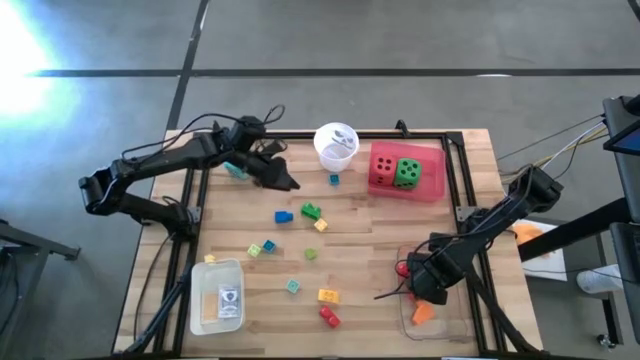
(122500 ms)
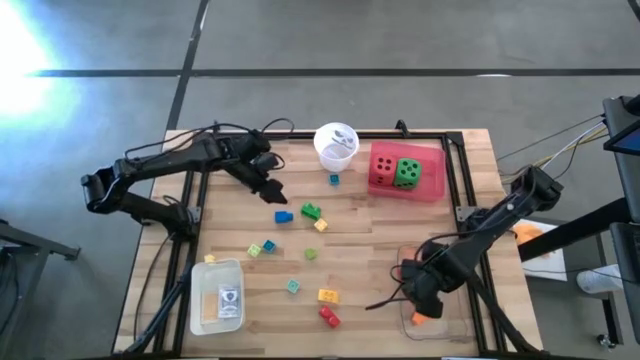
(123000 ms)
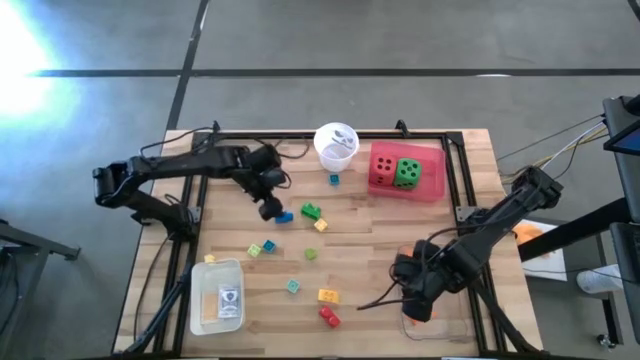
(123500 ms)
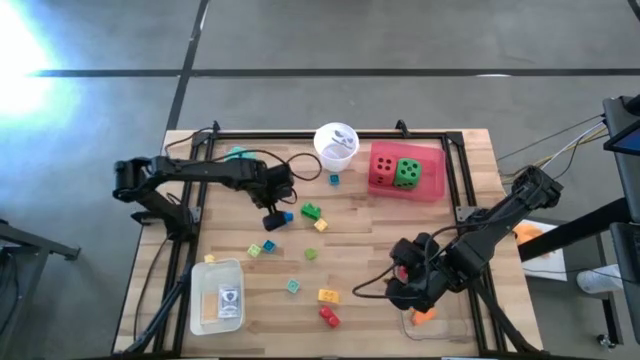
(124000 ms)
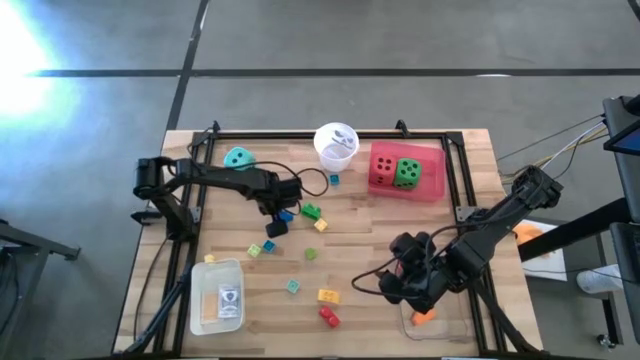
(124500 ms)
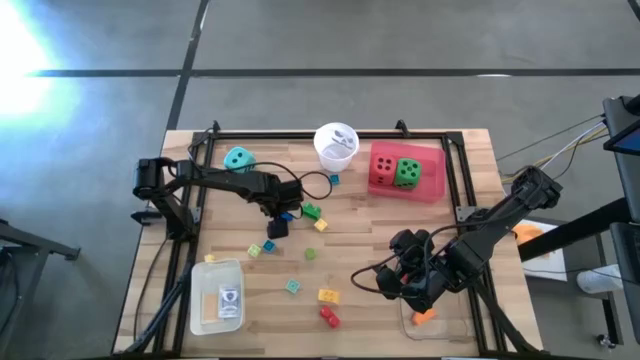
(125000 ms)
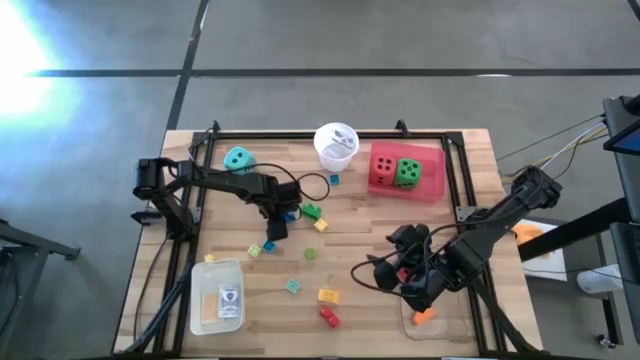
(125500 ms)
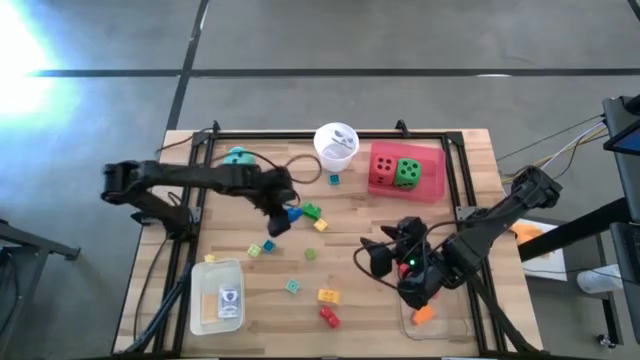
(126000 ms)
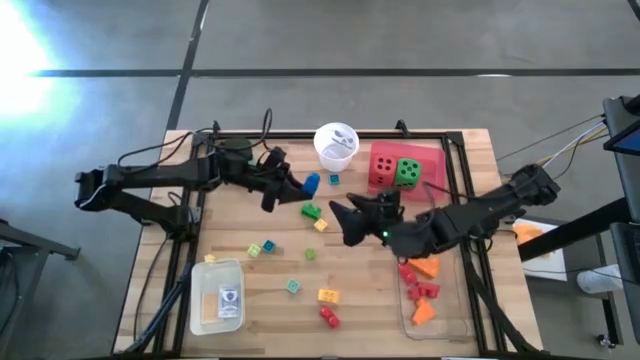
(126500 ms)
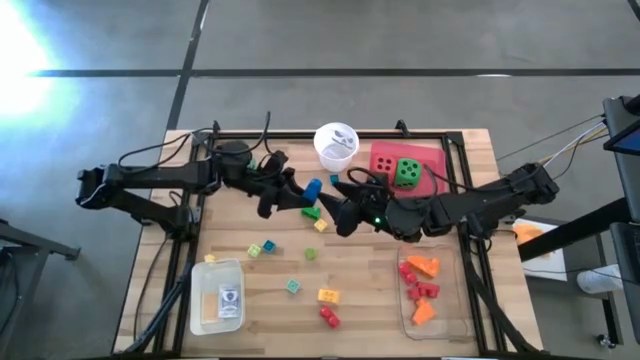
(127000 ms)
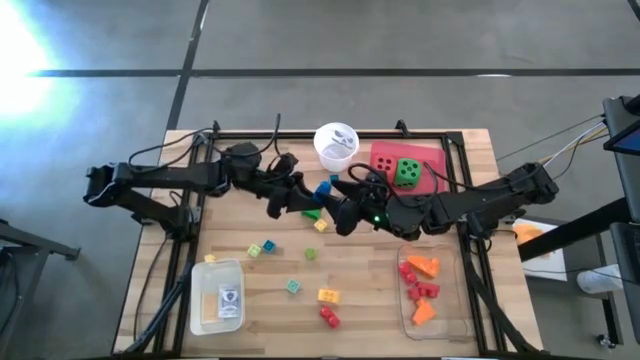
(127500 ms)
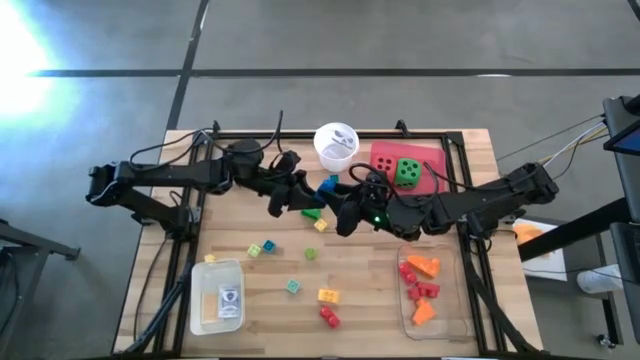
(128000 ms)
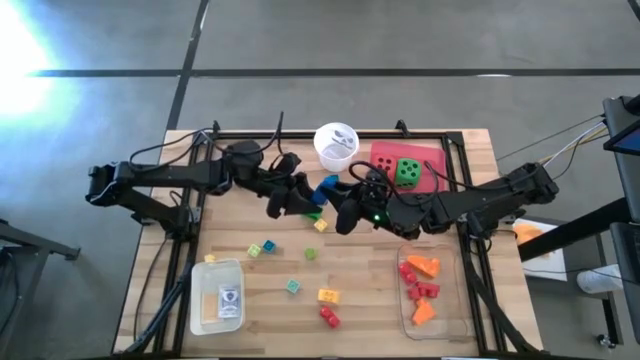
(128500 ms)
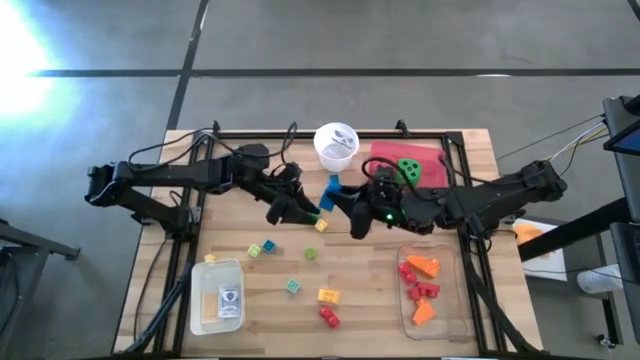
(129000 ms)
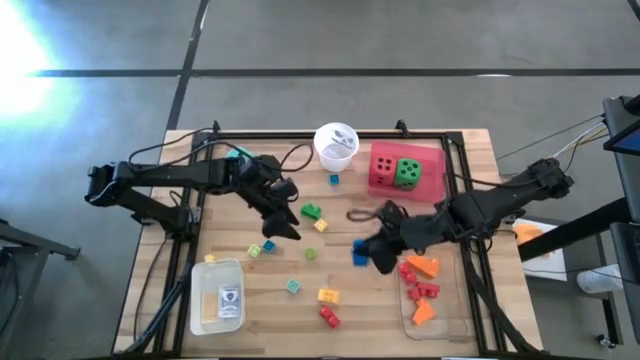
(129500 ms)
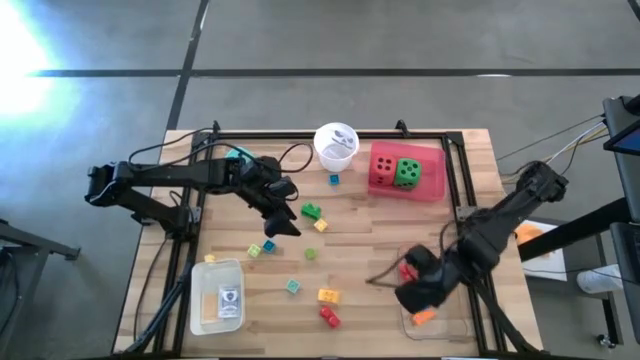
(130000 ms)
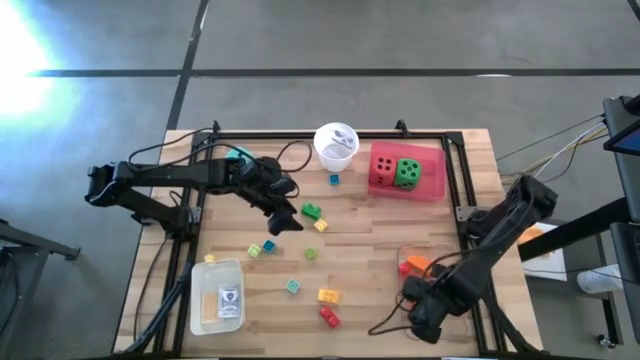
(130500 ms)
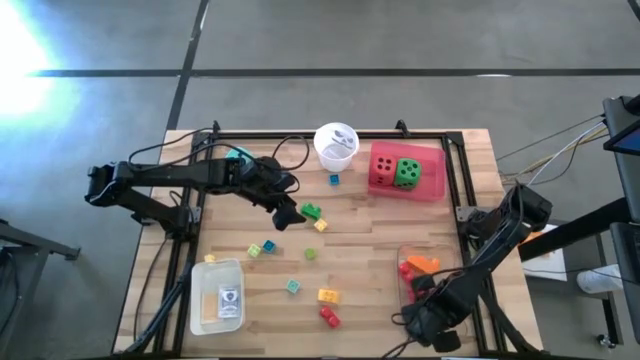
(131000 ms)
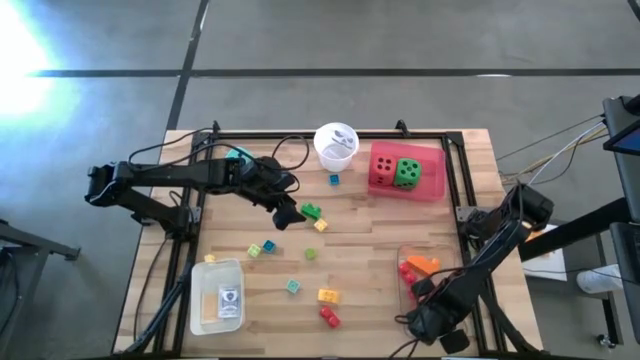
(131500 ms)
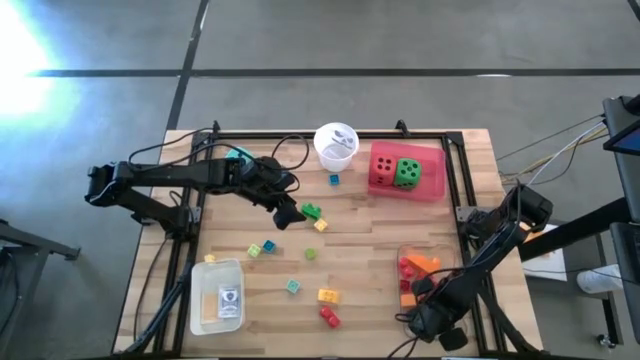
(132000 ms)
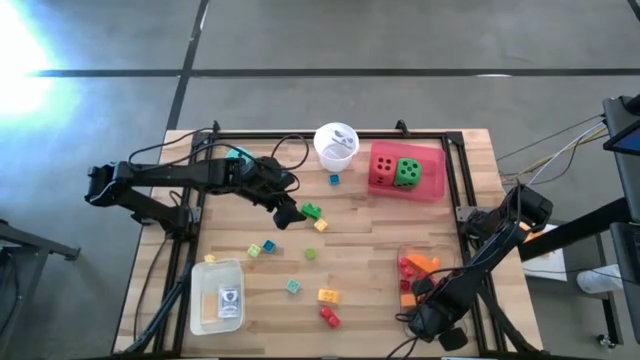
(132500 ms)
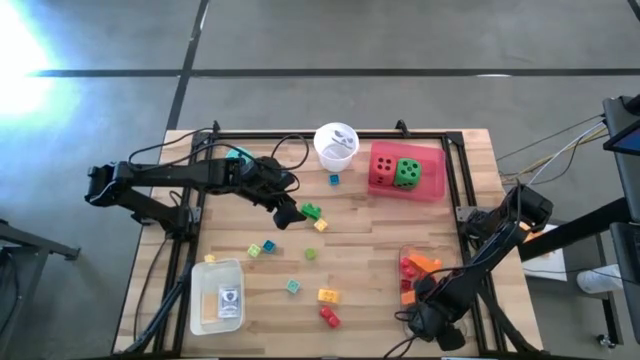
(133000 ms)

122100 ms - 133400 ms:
Task: Pick & Place Toys
Put the blue game piece into the transparent bin

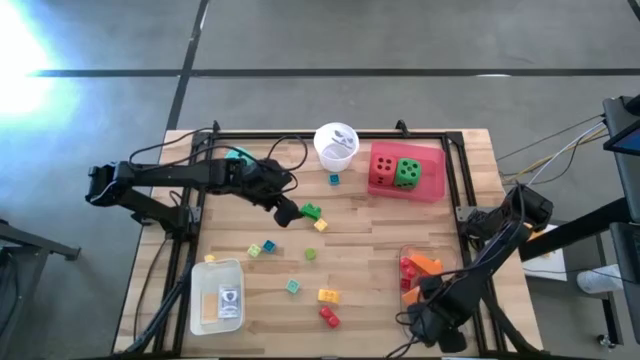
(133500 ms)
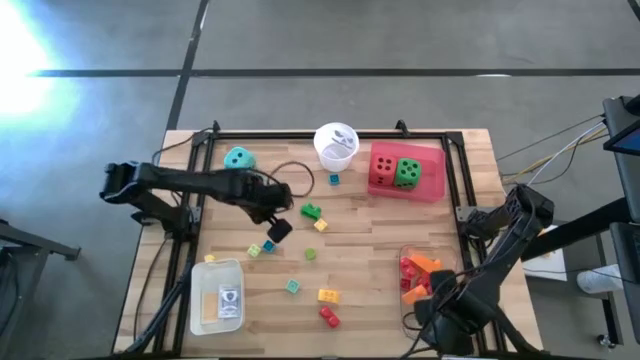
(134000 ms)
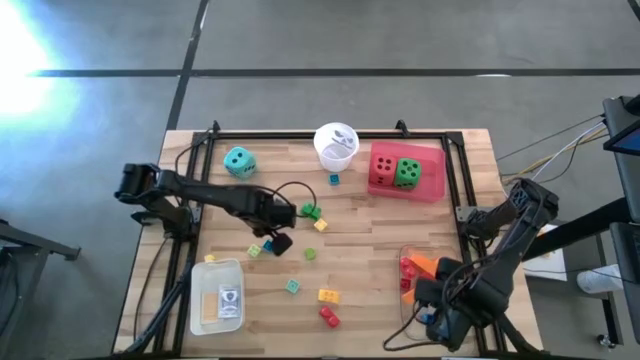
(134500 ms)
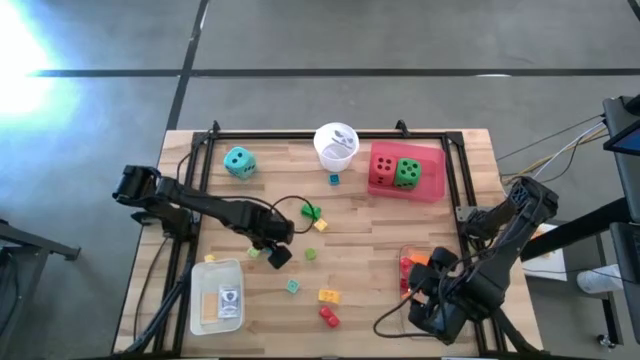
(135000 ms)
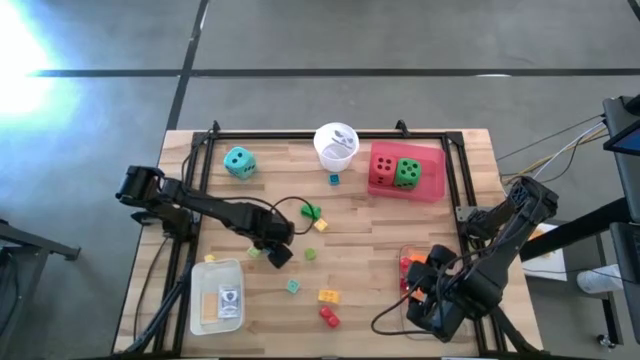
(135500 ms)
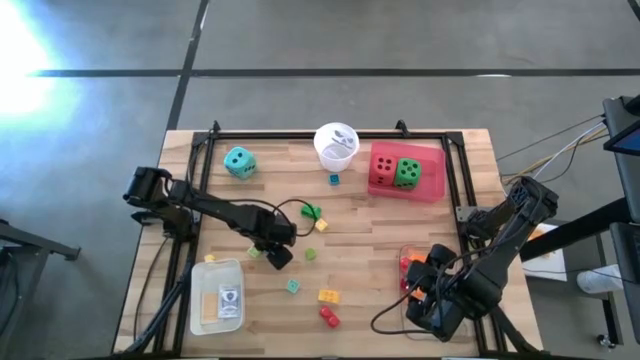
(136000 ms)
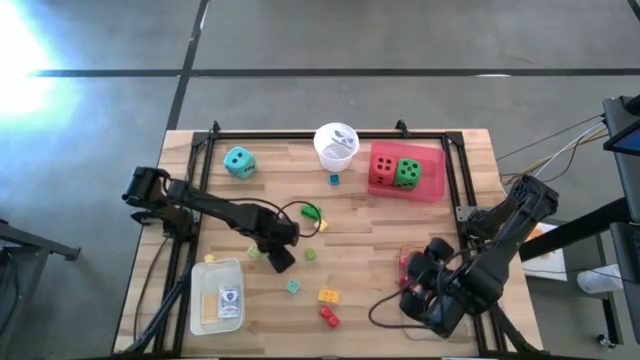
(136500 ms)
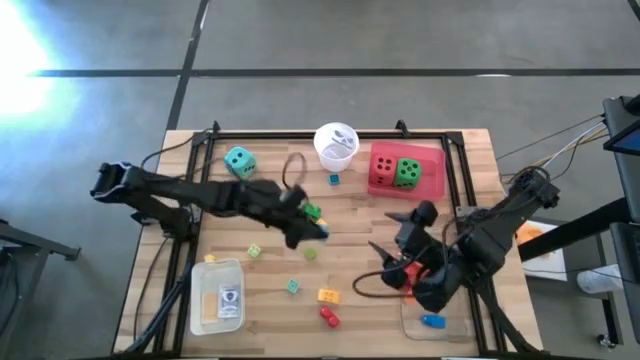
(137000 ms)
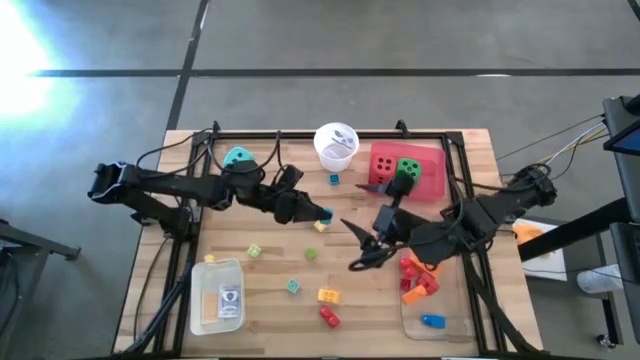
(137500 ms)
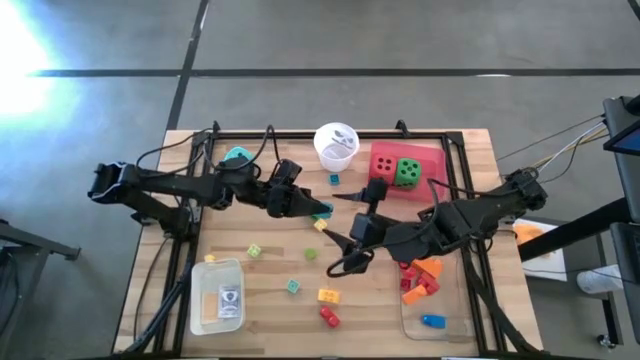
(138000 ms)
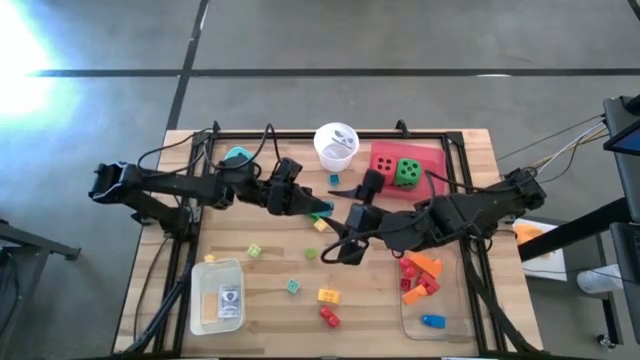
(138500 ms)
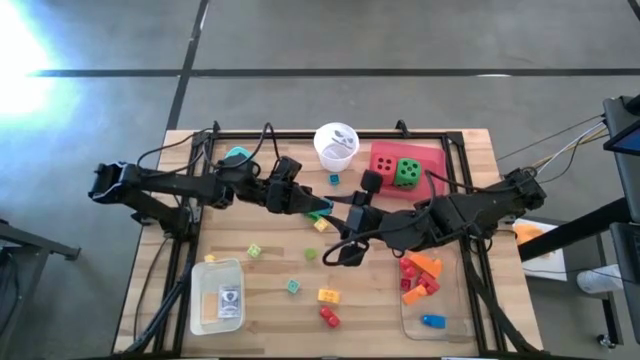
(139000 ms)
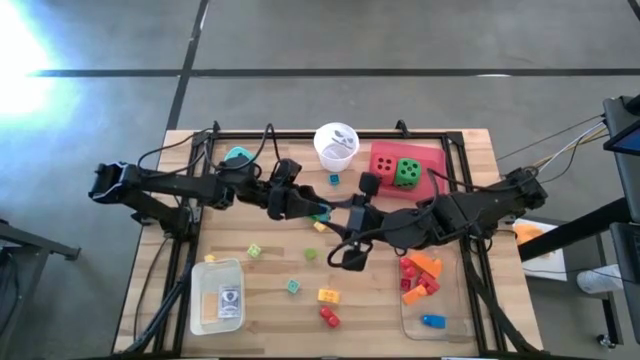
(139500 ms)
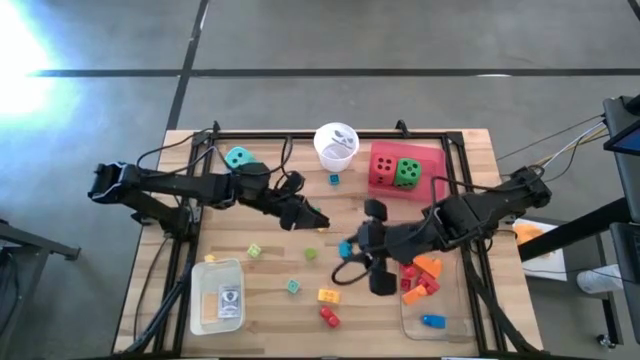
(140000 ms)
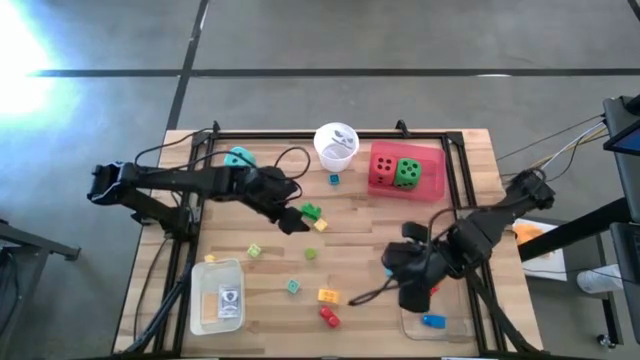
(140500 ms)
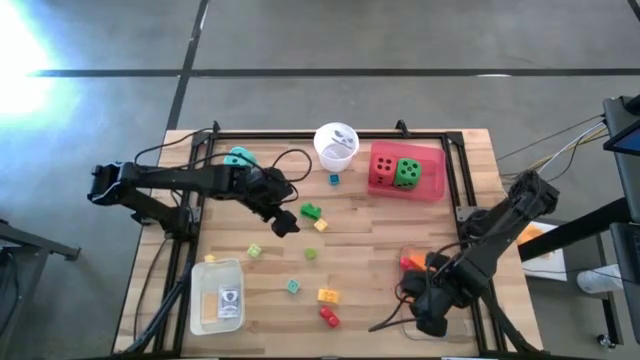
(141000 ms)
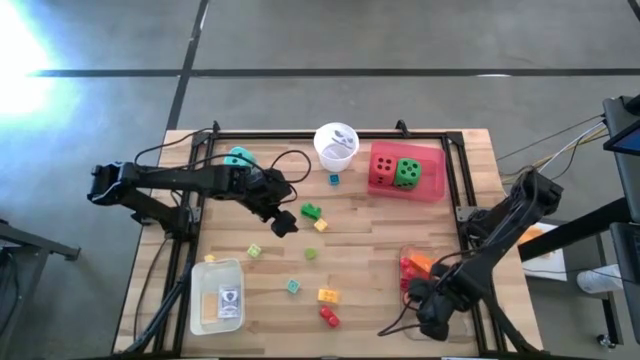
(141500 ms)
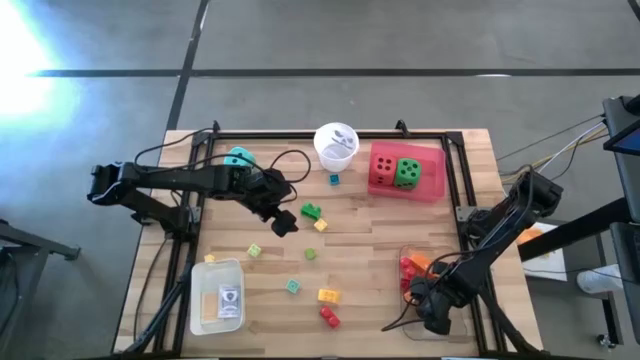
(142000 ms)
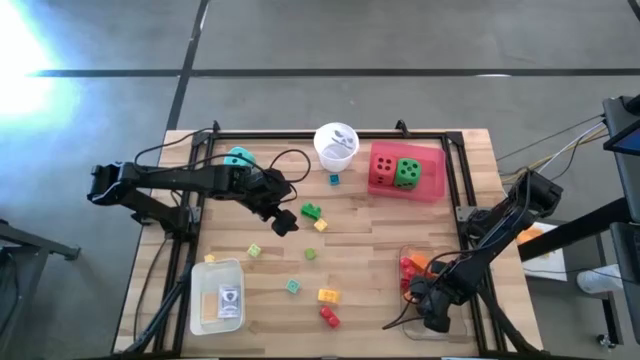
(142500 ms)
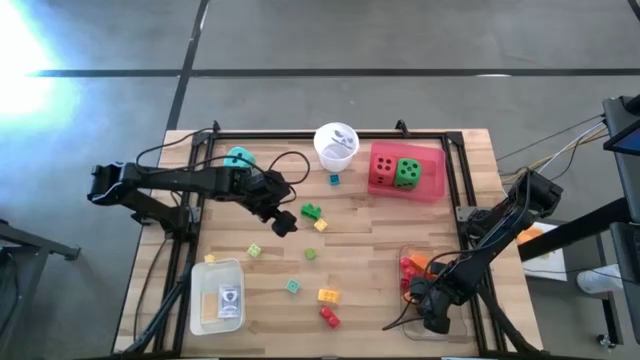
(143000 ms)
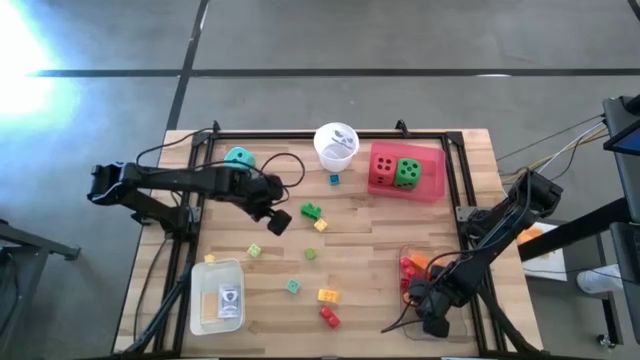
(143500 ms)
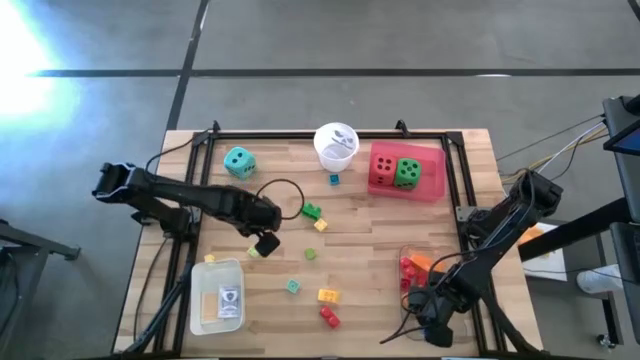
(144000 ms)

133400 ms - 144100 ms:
Put the blue game piece into the transparent bin
